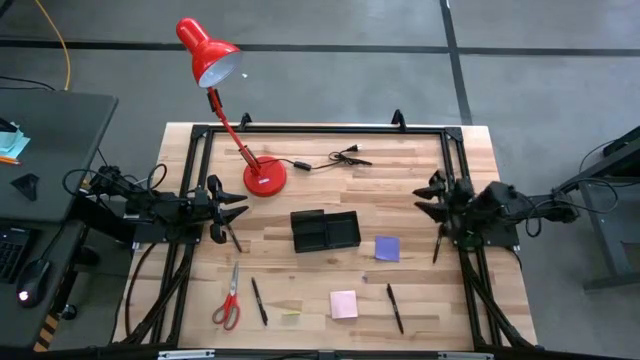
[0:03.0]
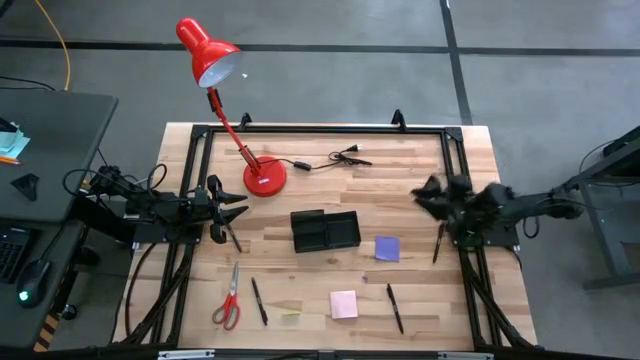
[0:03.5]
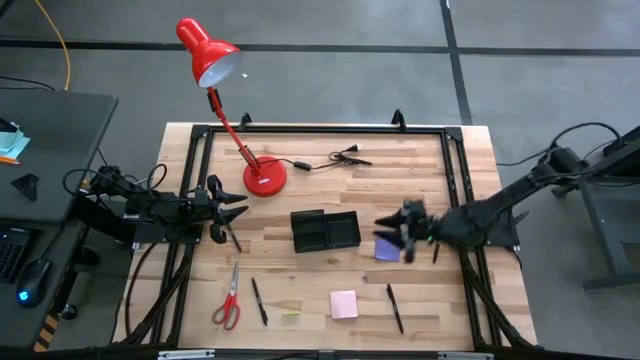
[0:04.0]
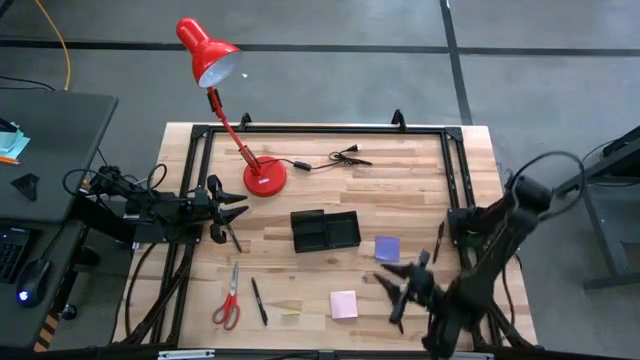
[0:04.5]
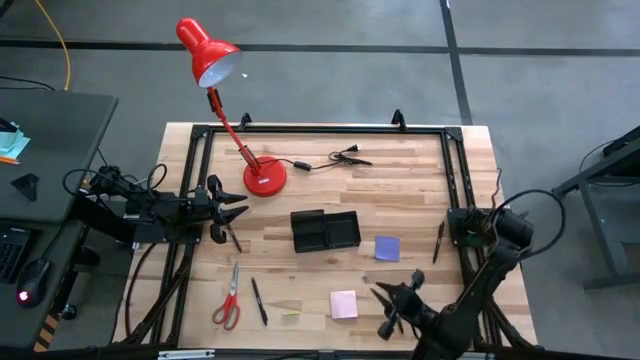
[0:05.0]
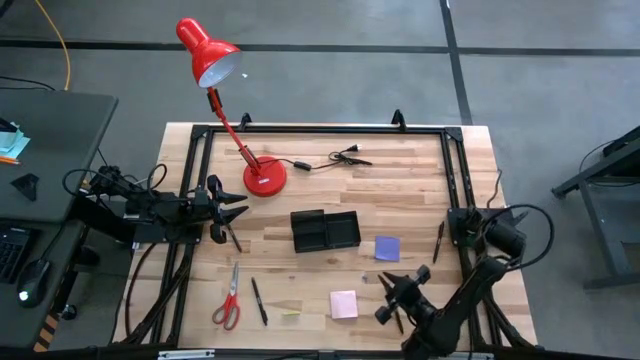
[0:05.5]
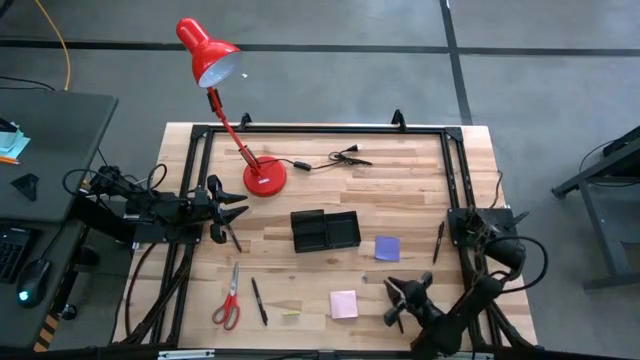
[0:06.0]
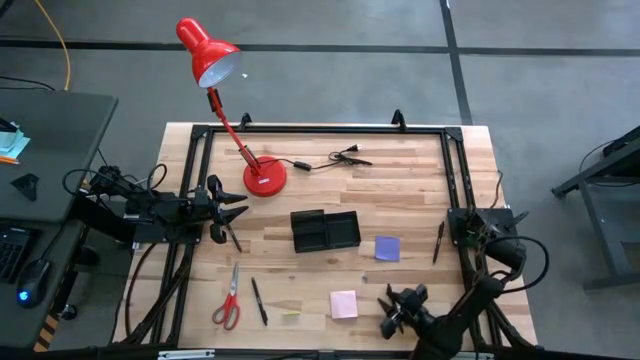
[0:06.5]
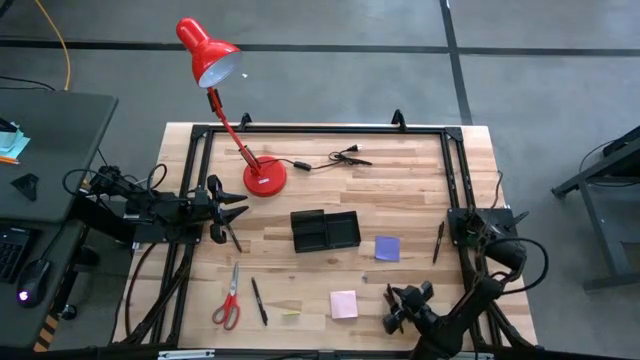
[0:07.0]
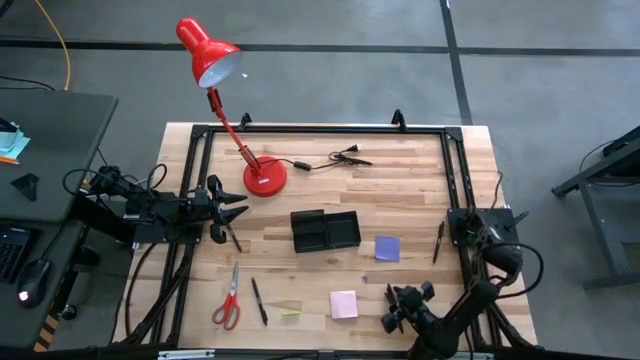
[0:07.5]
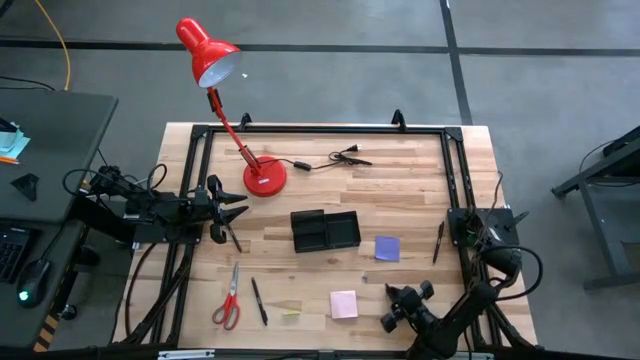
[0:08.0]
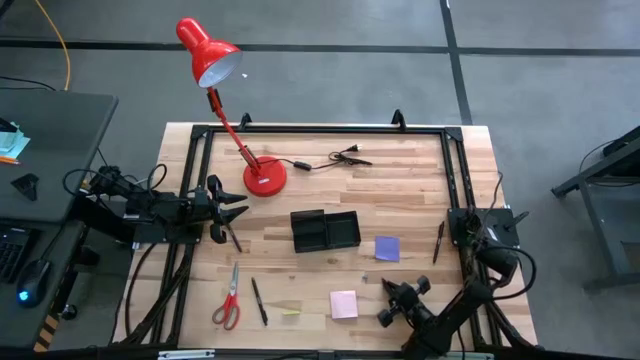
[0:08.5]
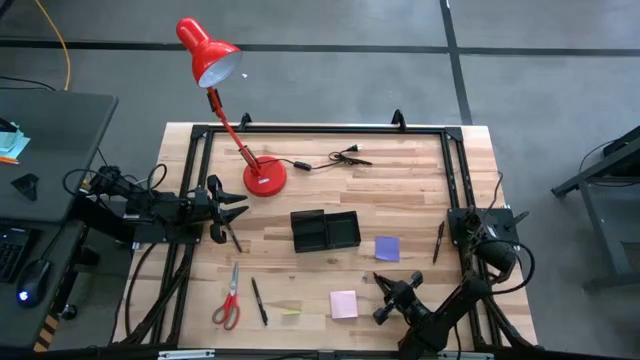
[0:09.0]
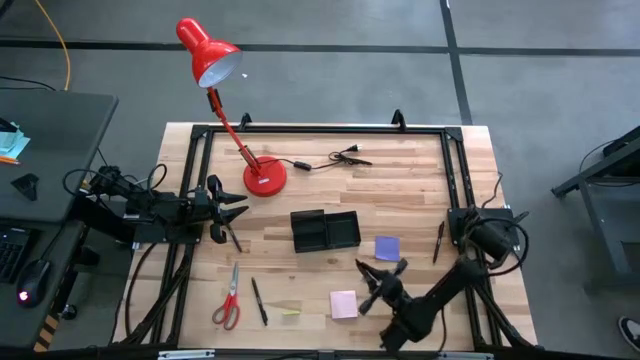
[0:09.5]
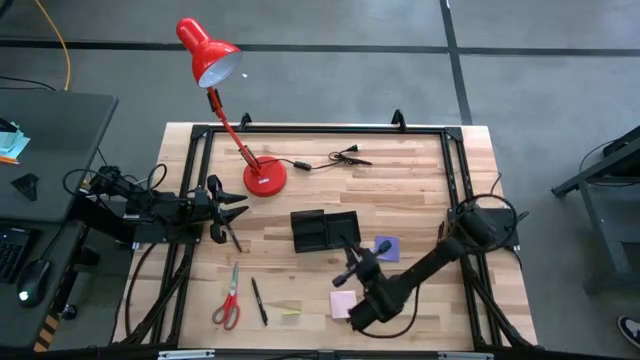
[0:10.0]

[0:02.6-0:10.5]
Task: Pick and place office supplies into organizer
Put the black pen into the black desk organizer

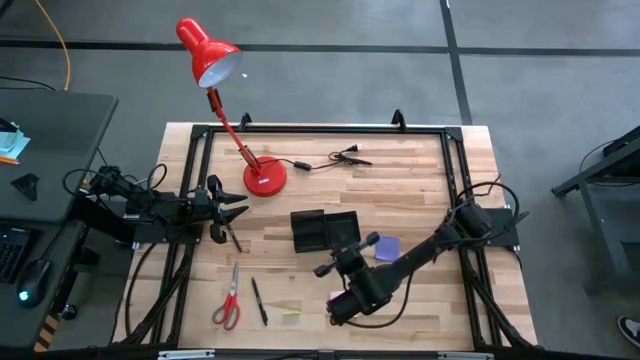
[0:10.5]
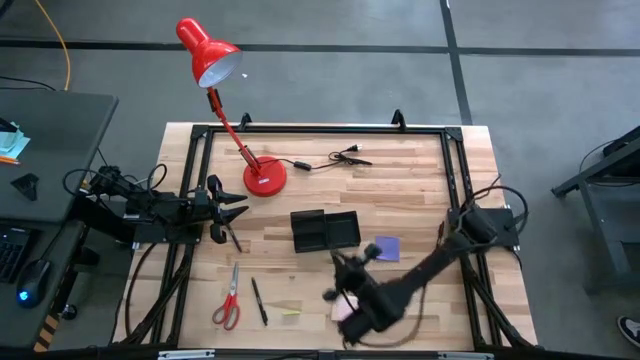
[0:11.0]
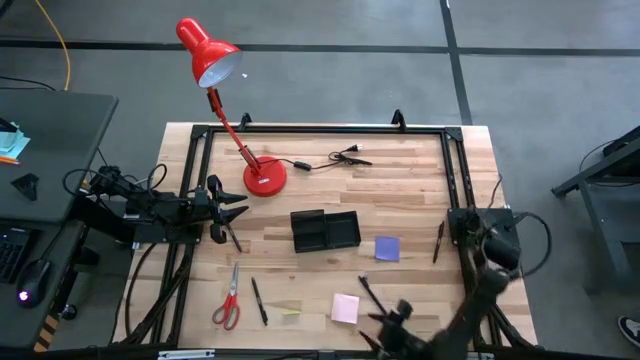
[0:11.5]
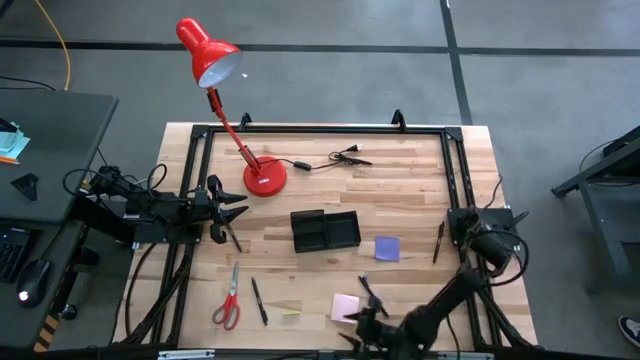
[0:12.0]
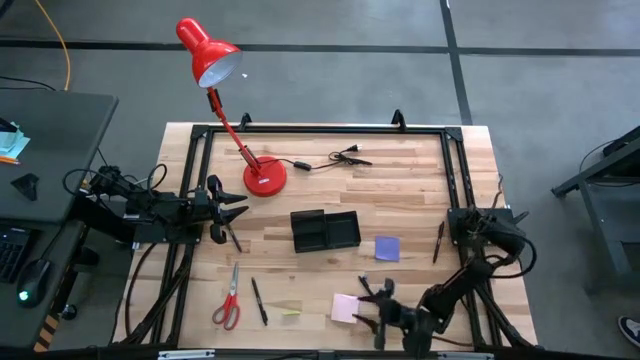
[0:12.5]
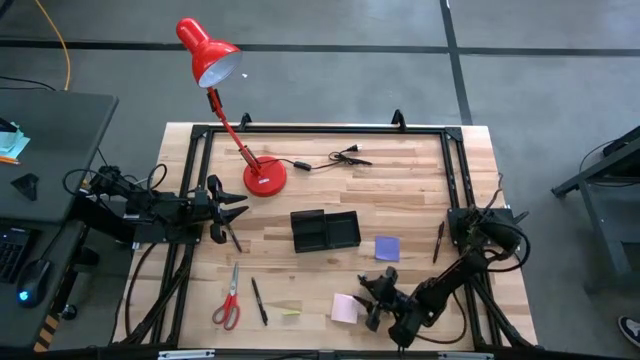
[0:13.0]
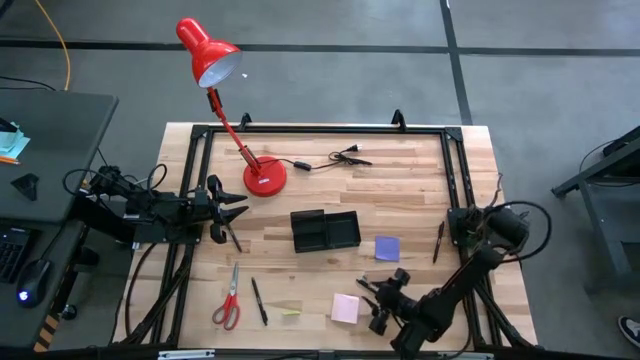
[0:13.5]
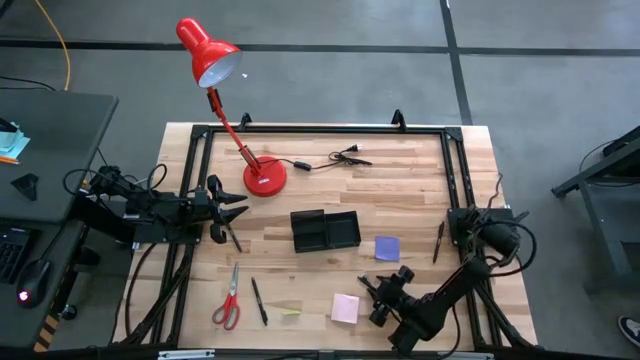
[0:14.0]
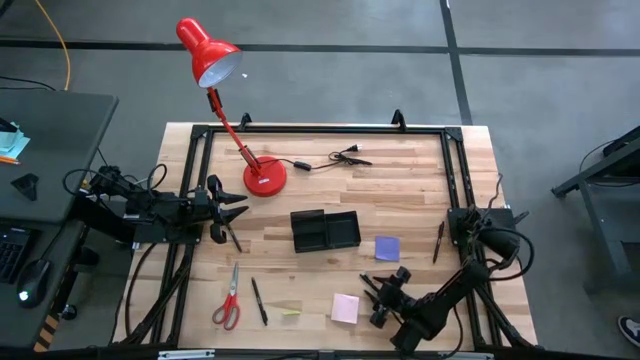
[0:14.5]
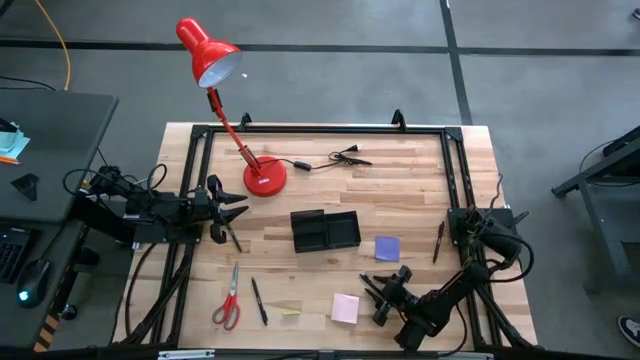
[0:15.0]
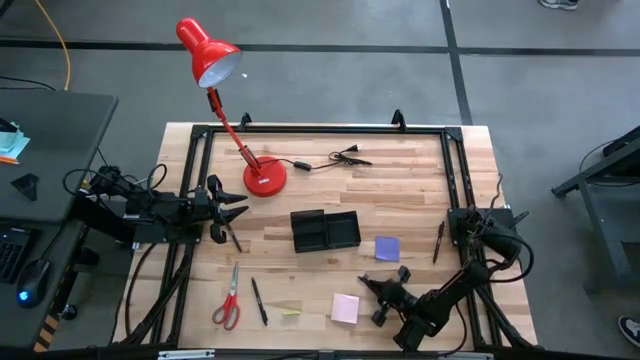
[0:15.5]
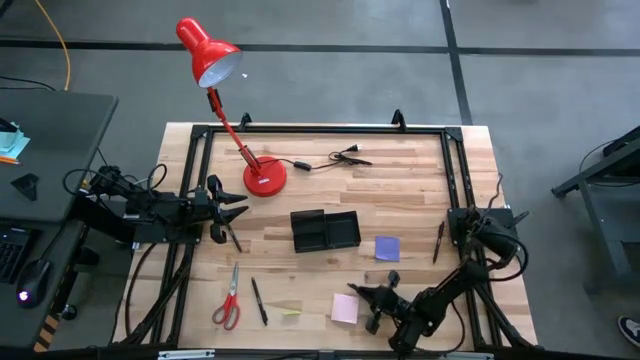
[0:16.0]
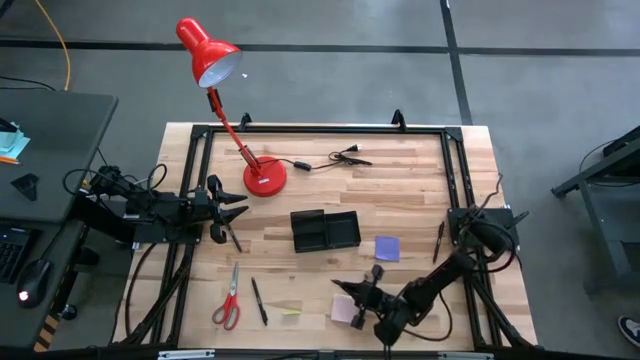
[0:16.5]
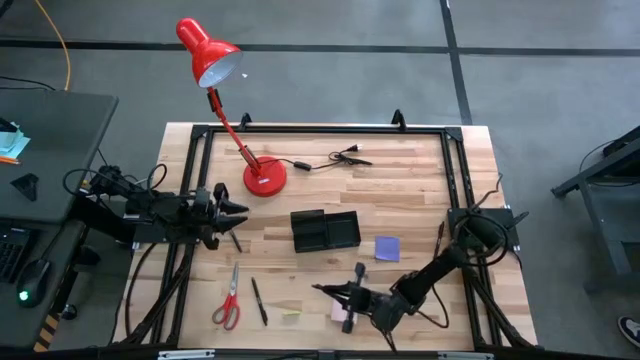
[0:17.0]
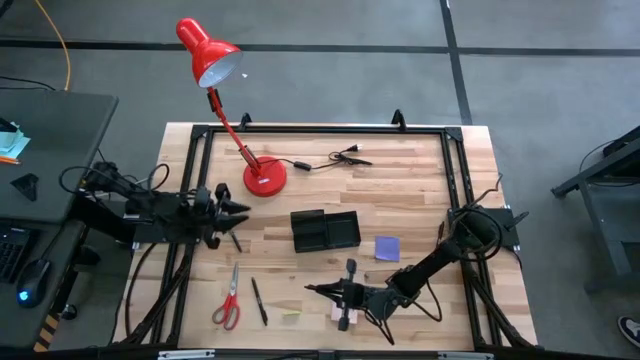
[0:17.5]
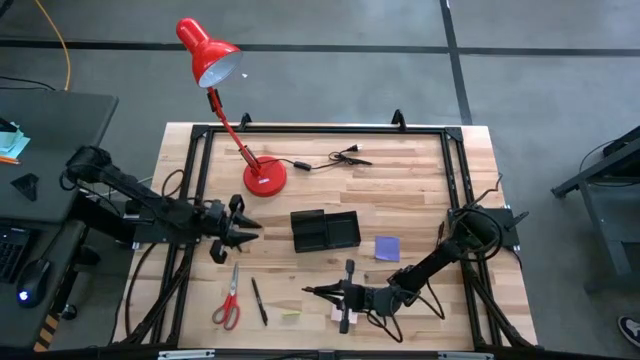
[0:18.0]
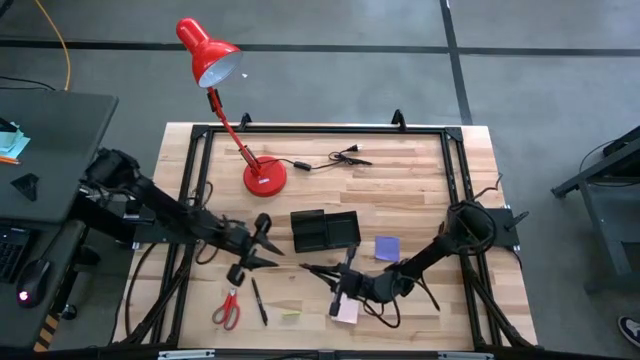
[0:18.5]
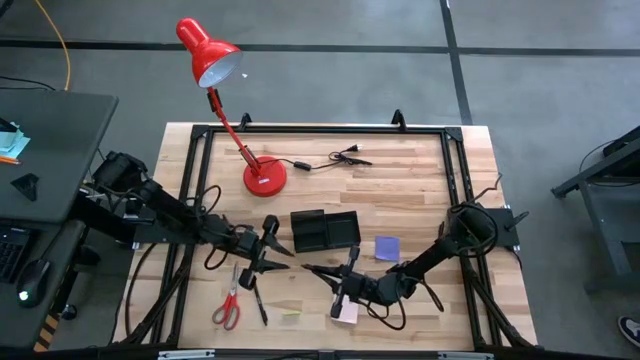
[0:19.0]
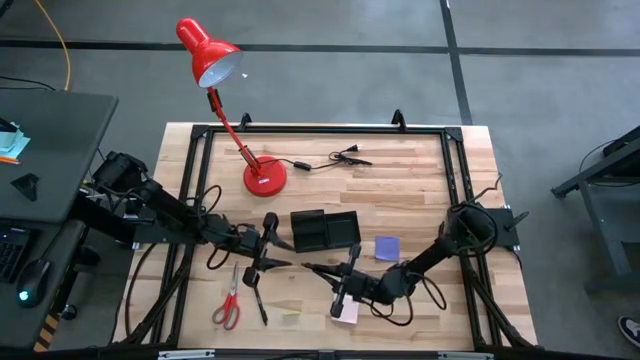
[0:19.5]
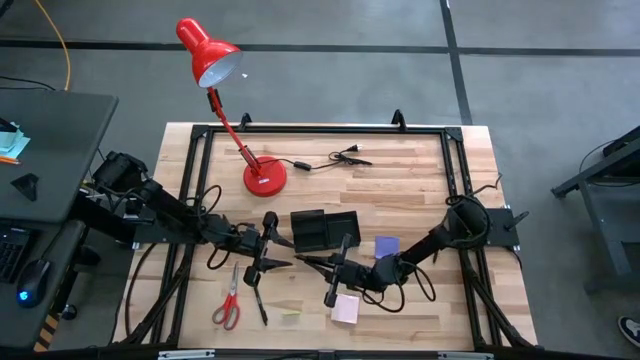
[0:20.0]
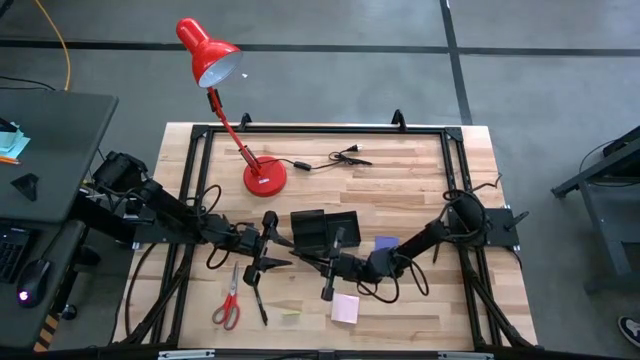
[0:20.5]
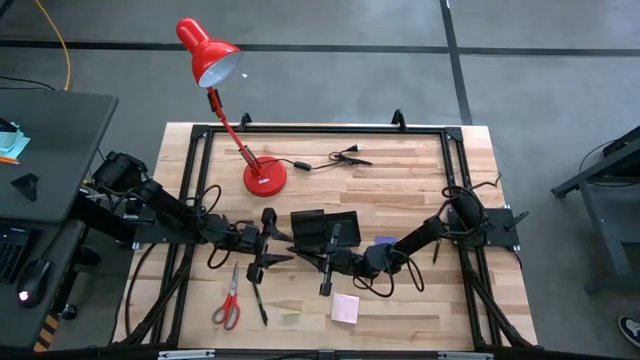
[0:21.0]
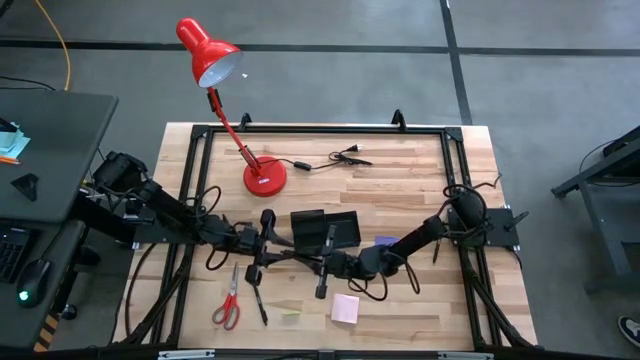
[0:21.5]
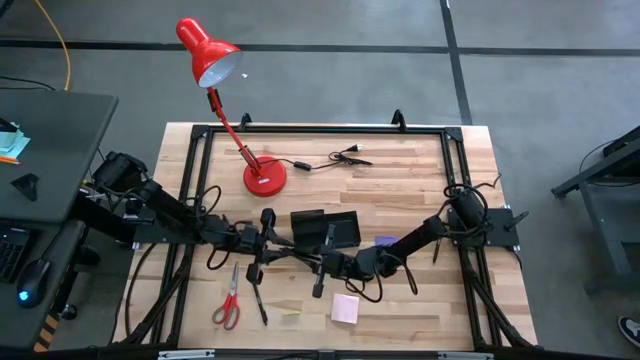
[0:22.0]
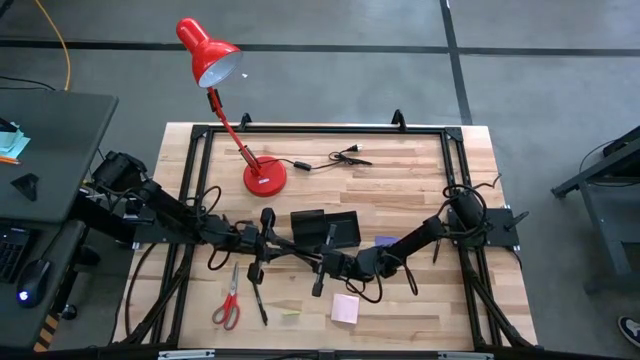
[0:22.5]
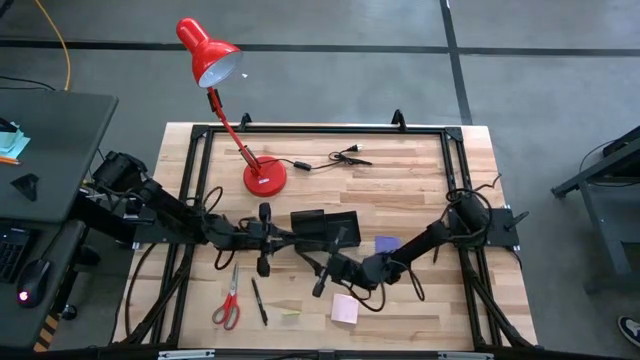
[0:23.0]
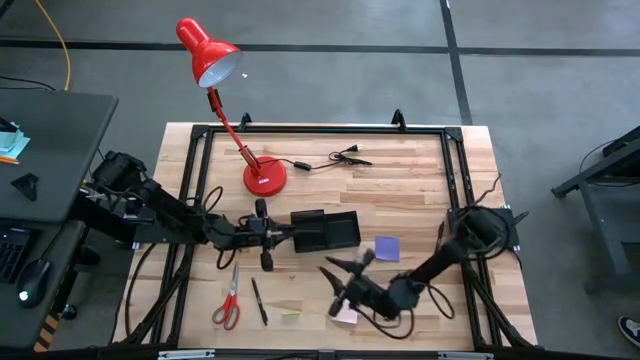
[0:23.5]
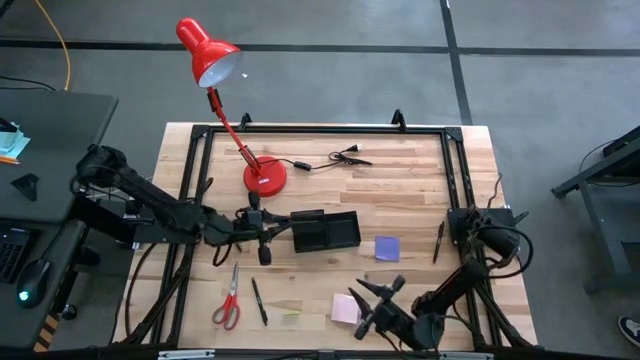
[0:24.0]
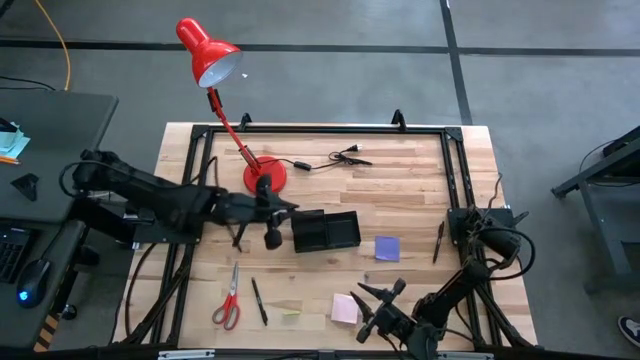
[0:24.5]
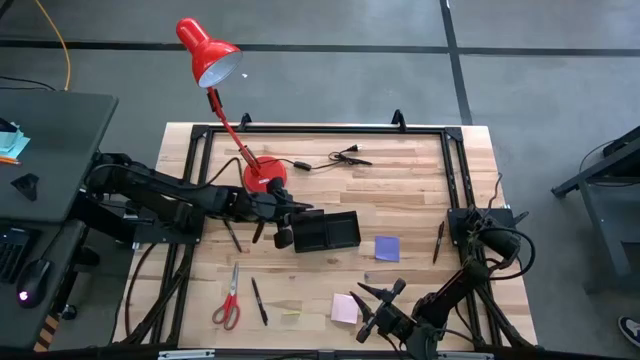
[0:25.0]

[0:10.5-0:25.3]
Put the black pen into the black desk organizer
